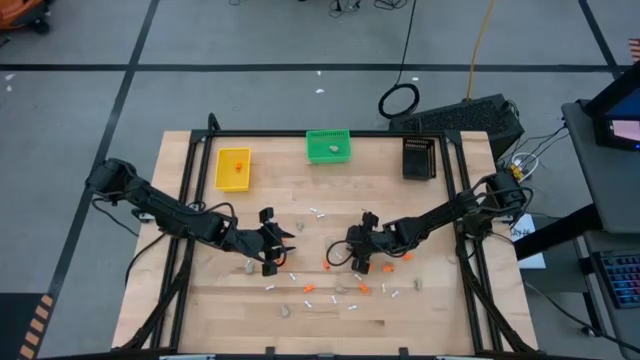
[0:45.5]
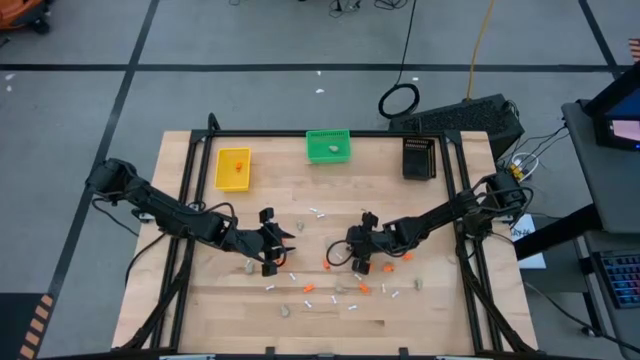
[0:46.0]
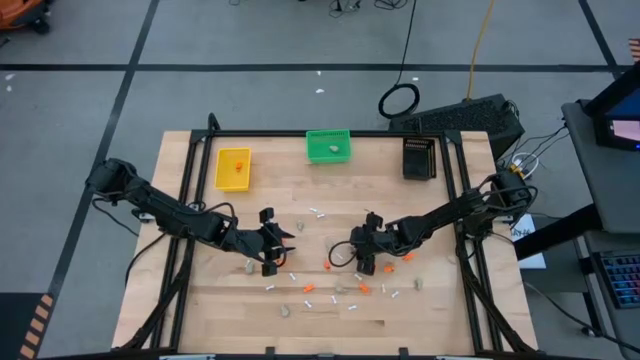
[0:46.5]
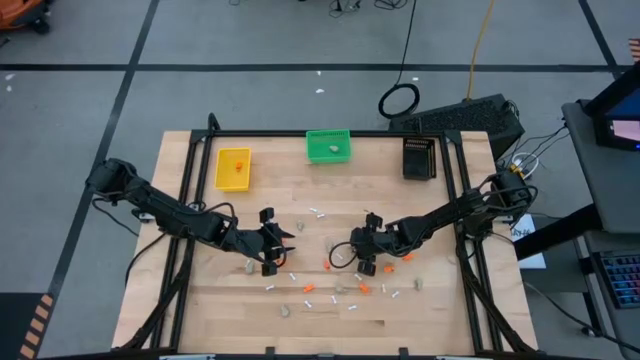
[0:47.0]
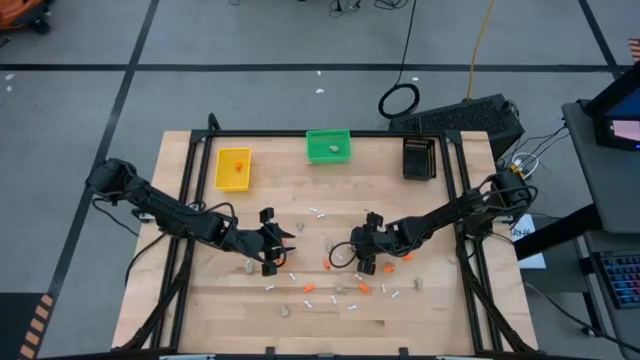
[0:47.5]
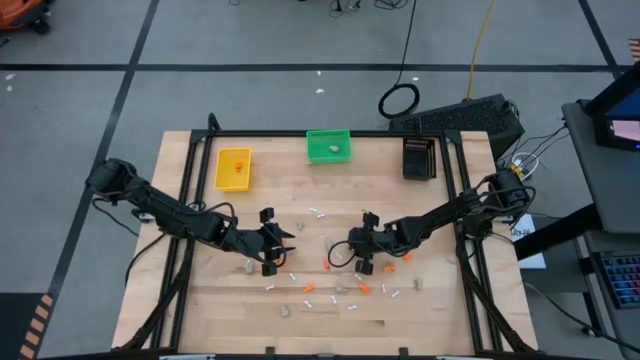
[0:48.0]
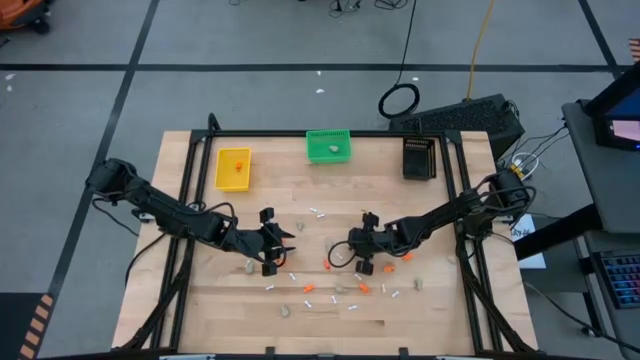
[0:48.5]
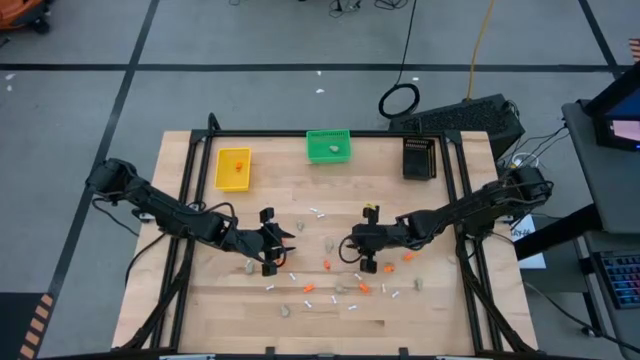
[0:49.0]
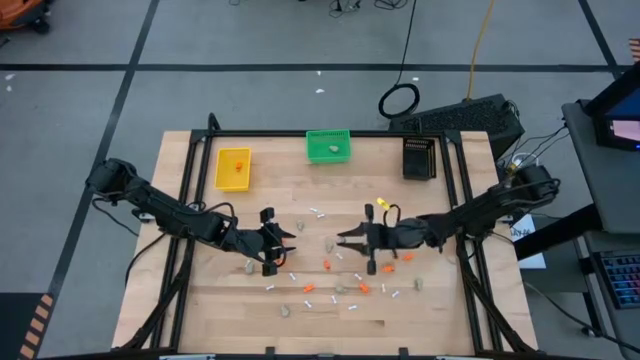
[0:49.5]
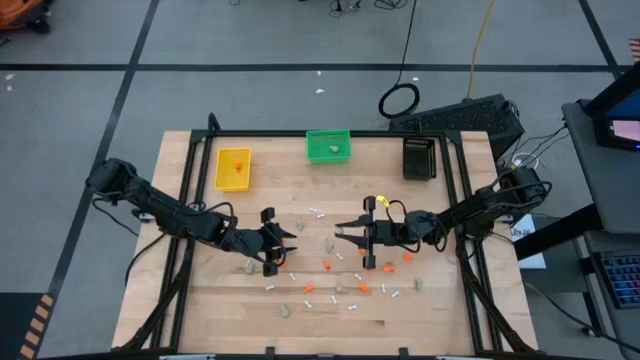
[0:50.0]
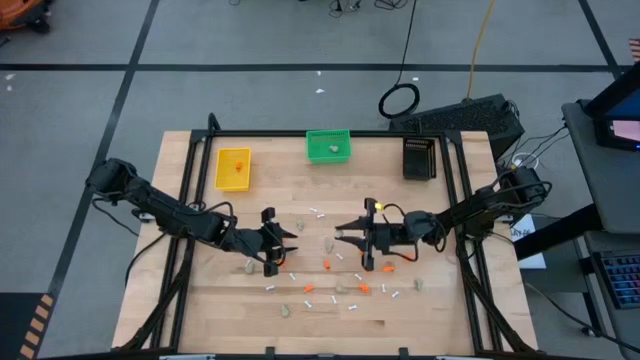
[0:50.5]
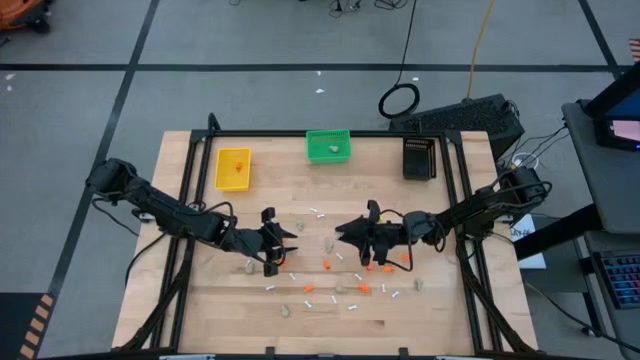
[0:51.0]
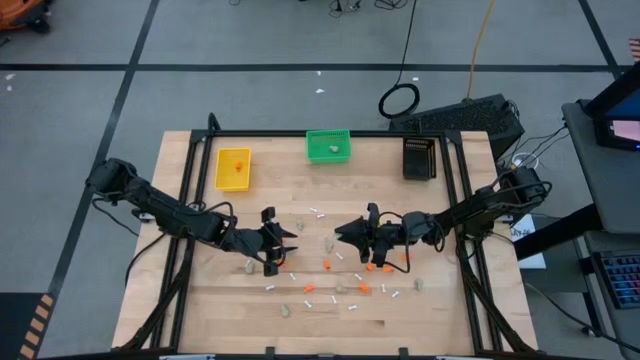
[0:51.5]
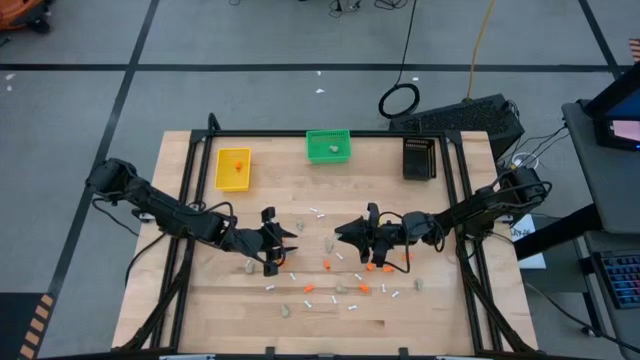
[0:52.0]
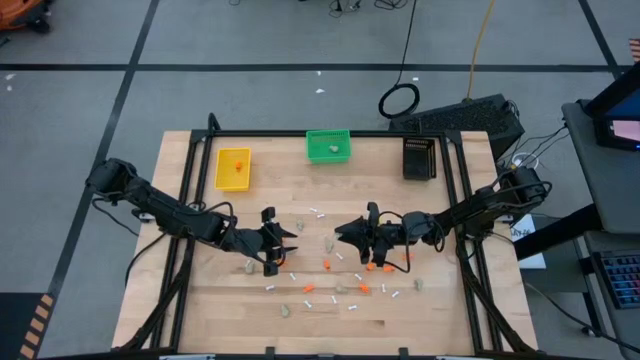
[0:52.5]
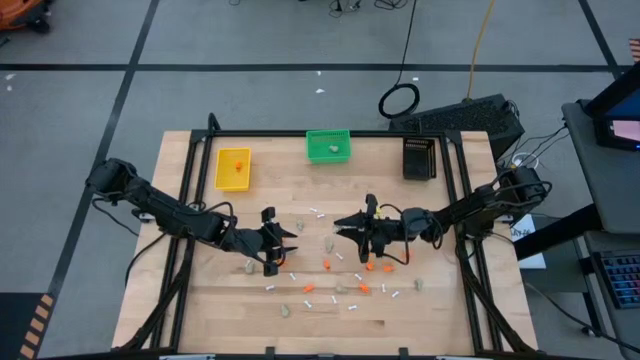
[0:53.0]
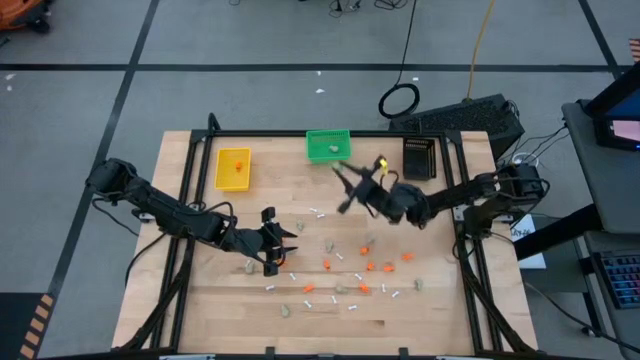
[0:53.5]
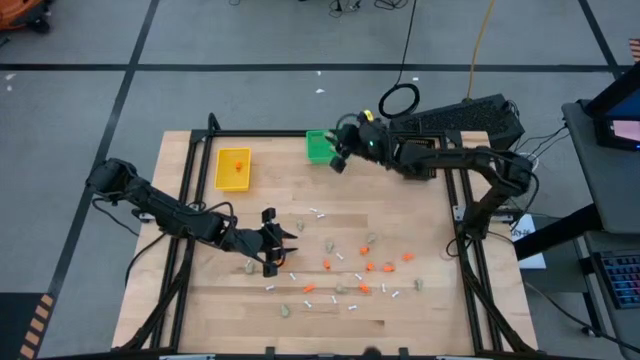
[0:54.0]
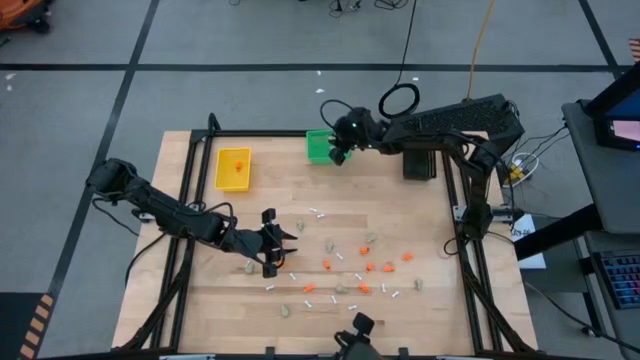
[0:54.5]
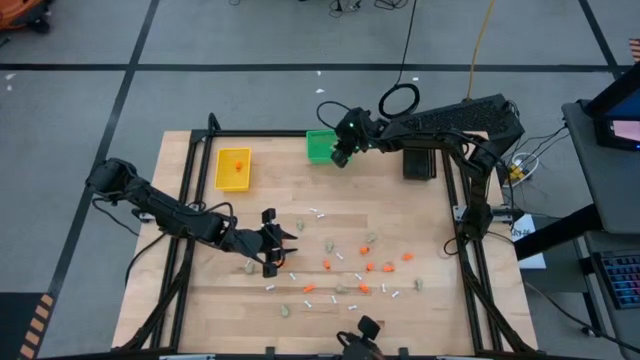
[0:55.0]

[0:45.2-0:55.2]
Task: Sort Halloween decoration
Put the gray skull toy into the green bin

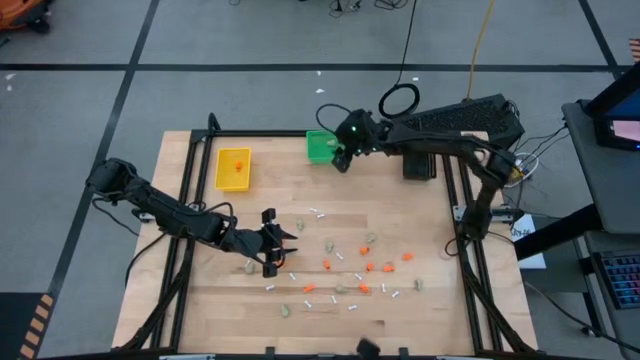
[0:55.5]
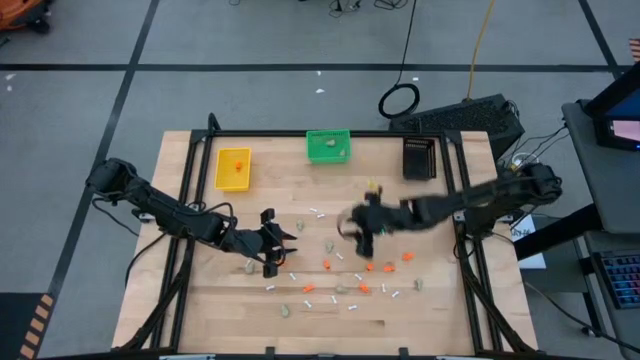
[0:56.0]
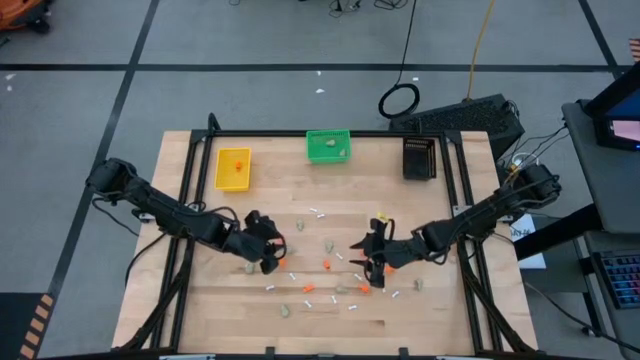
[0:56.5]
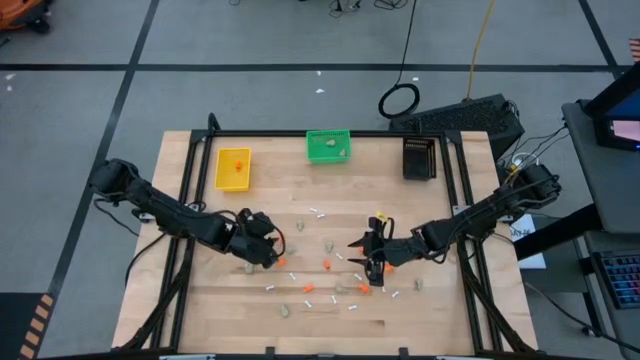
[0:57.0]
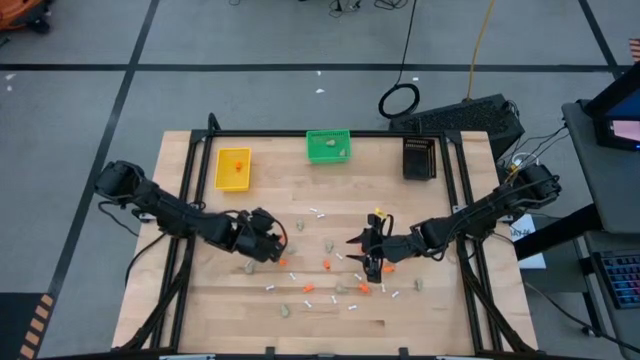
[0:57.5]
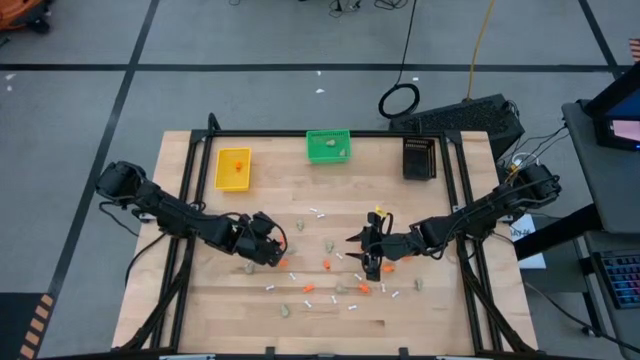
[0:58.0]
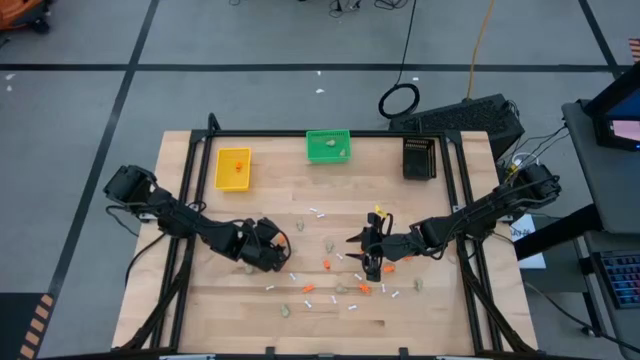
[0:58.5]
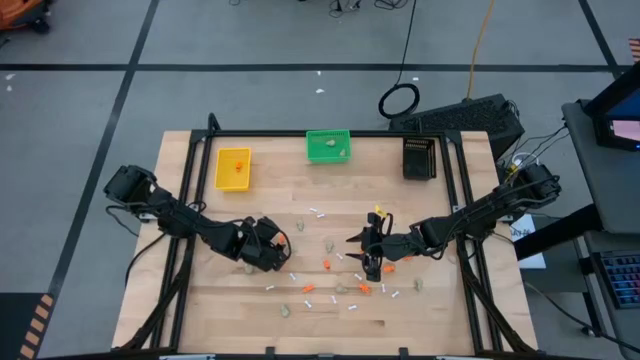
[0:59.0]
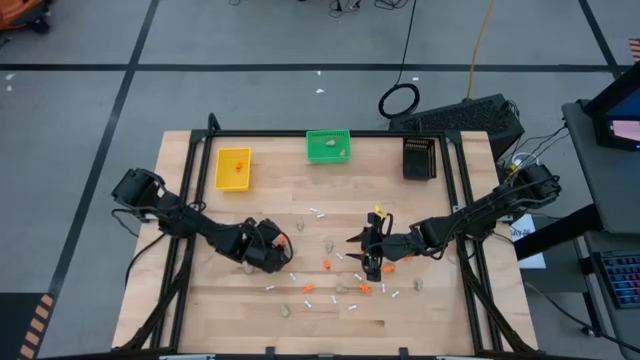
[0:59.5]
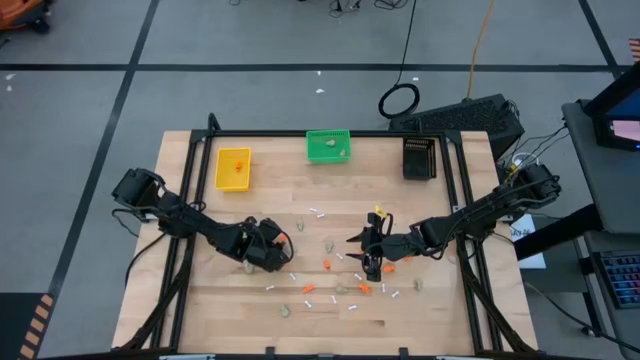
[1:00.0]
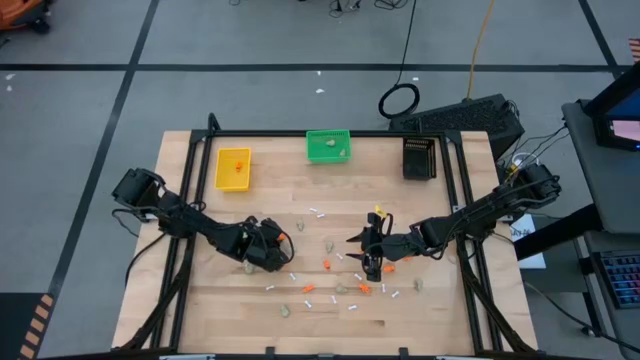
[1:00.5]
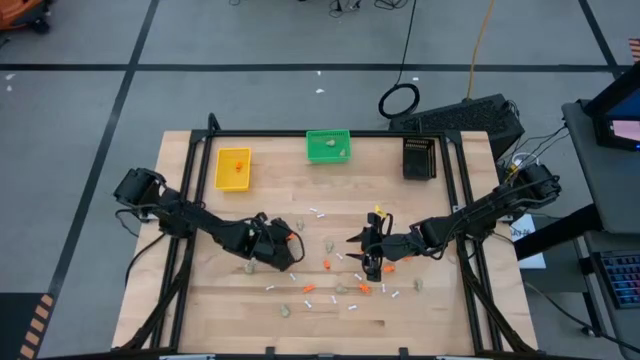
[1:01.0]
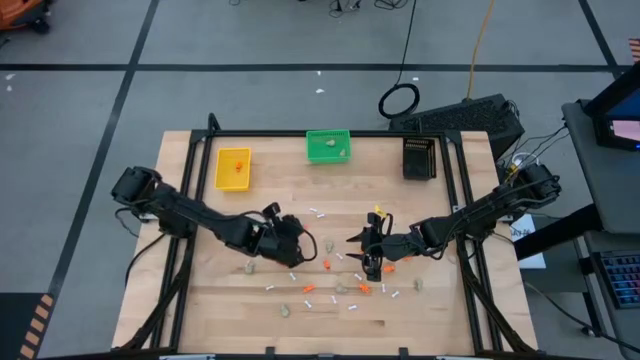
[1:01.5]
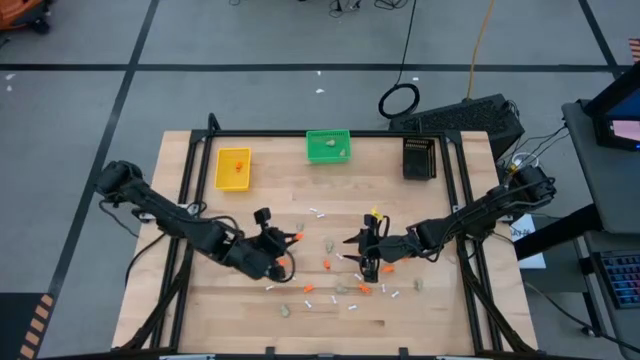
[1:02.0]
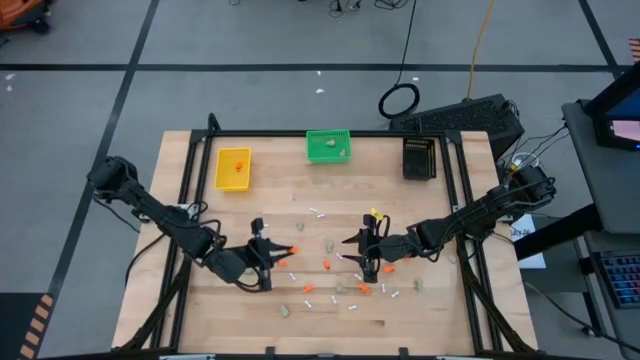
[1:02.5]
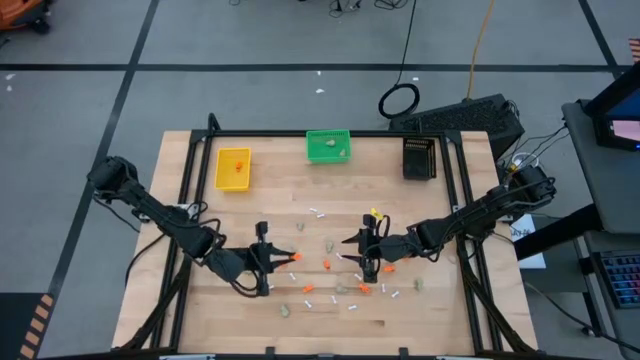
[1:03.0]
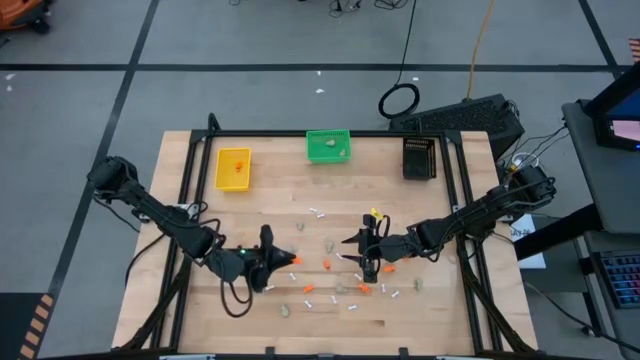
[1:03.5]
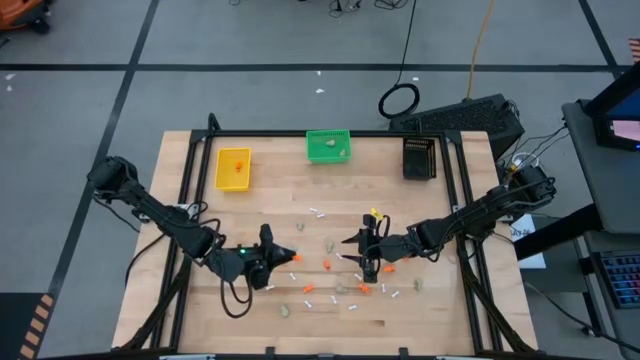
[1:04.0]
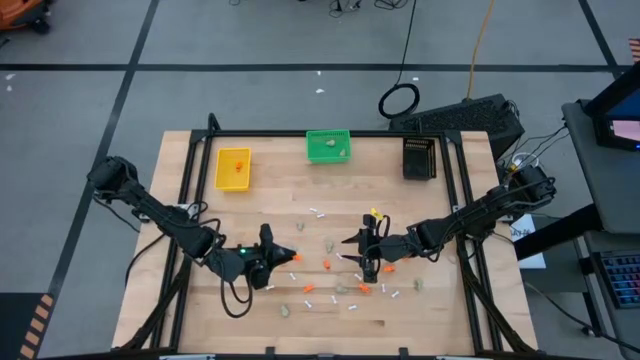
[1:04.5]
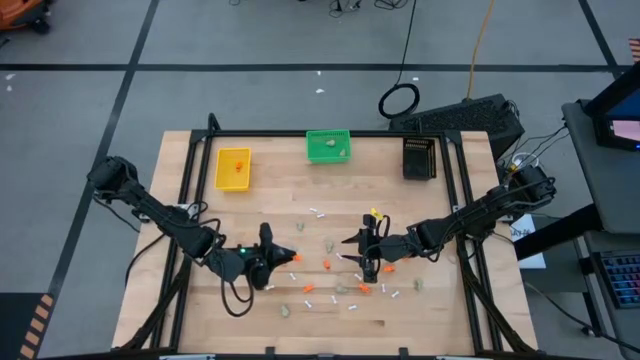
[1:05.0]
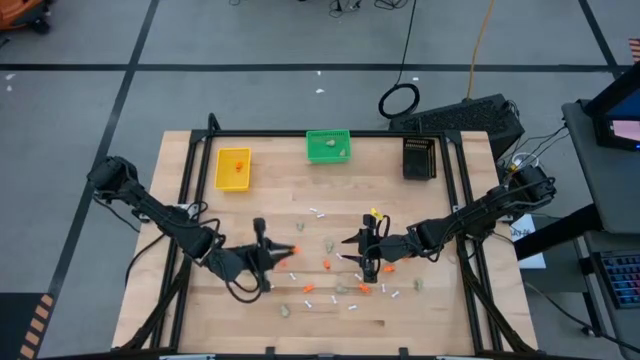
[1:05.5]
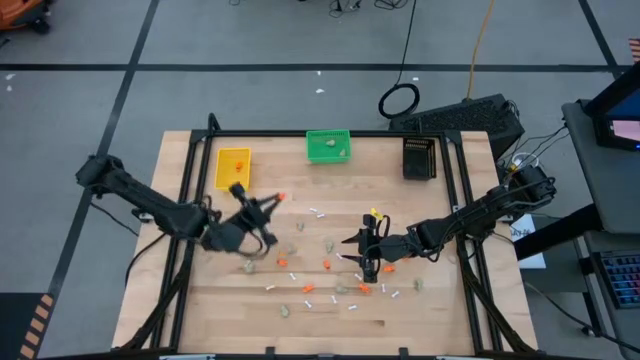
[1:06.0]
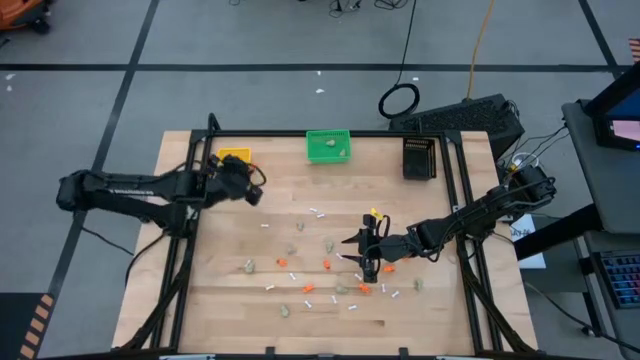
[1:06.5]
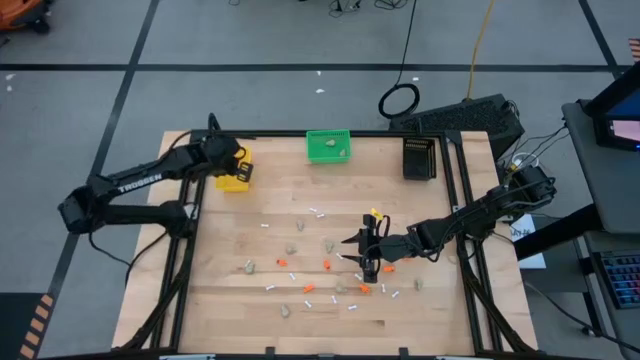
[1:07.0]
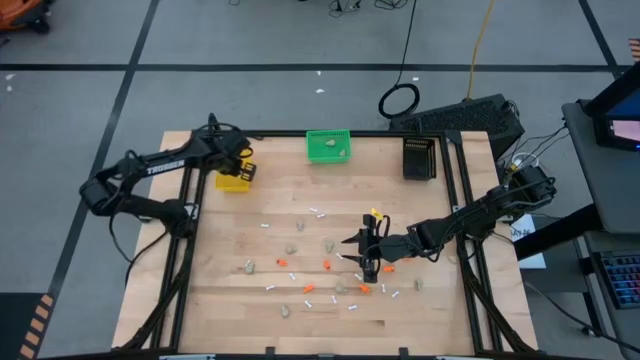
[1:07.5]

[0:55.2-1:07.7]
Put the orange skeleton toy into the yellow bin
